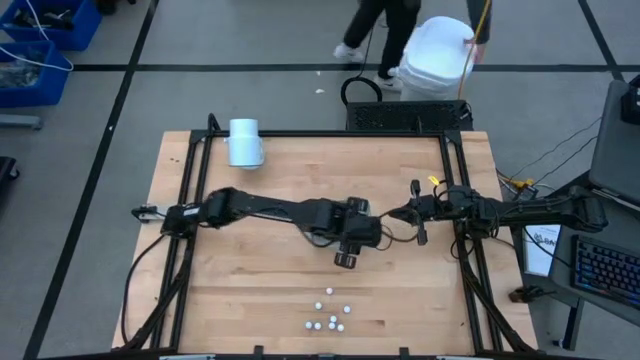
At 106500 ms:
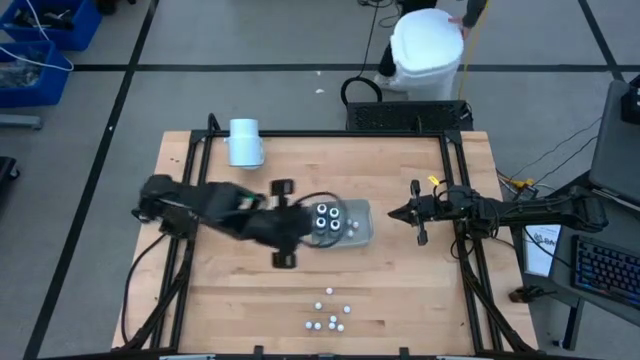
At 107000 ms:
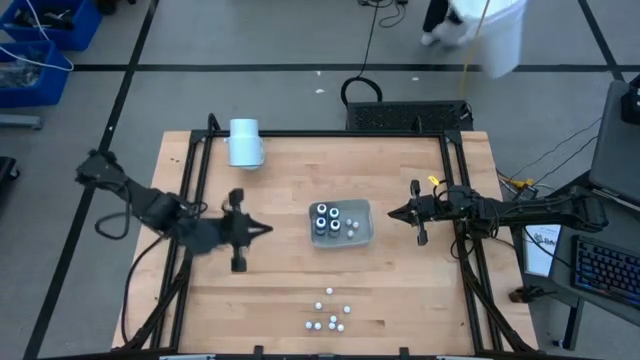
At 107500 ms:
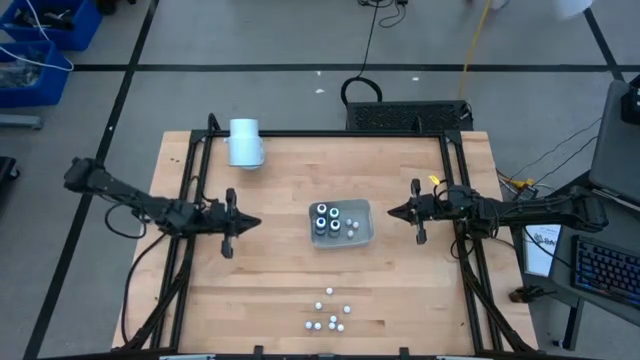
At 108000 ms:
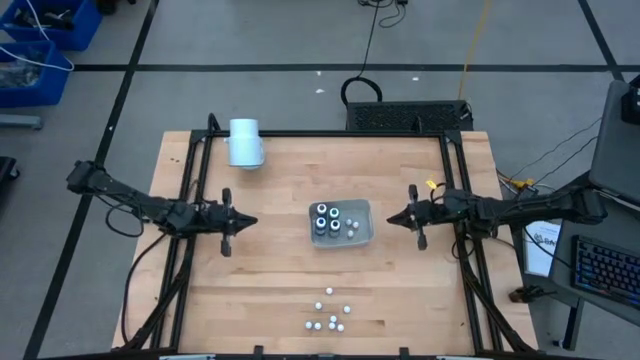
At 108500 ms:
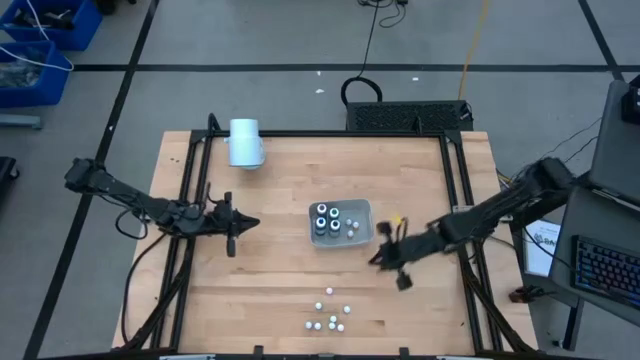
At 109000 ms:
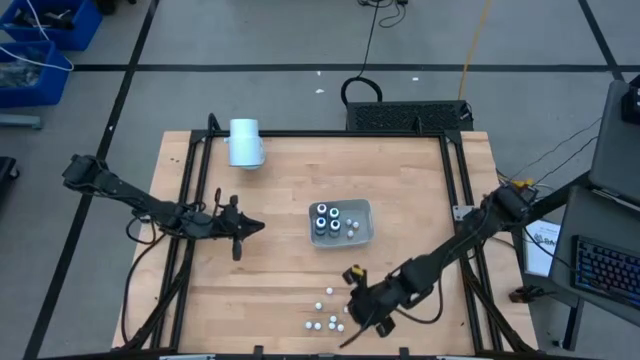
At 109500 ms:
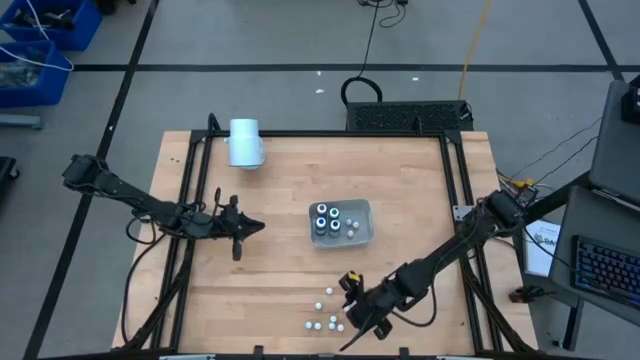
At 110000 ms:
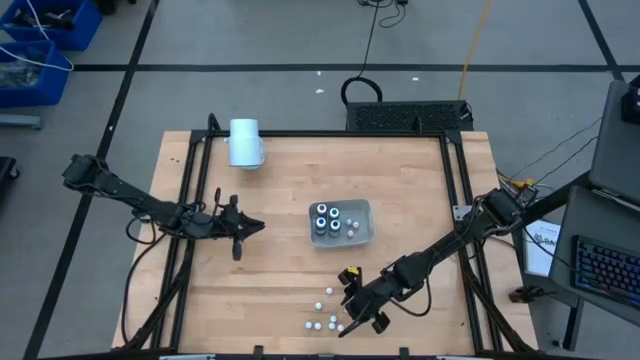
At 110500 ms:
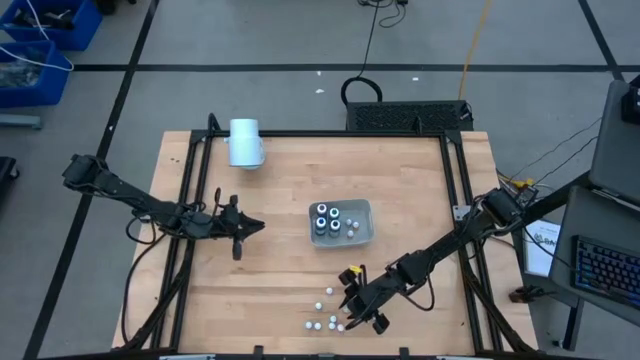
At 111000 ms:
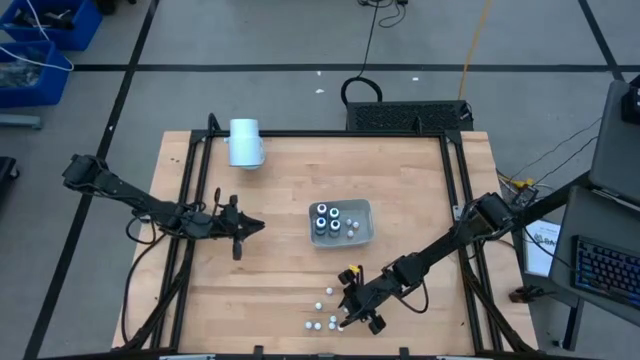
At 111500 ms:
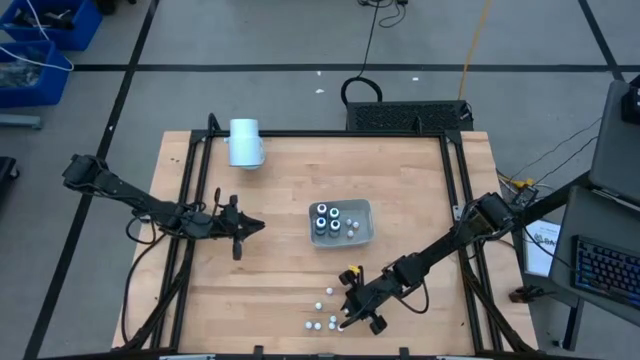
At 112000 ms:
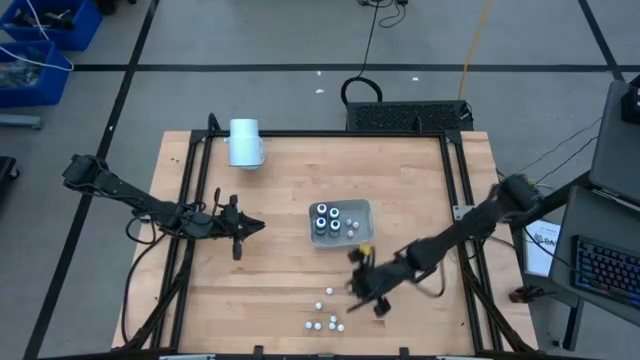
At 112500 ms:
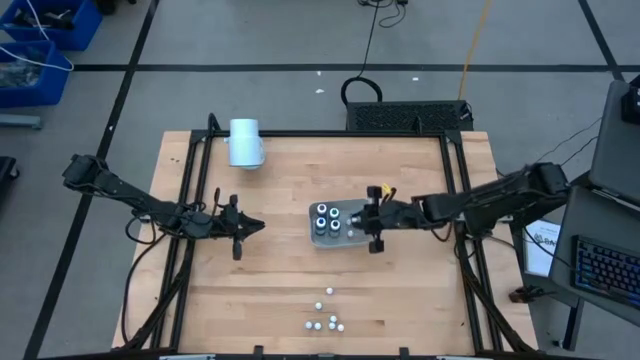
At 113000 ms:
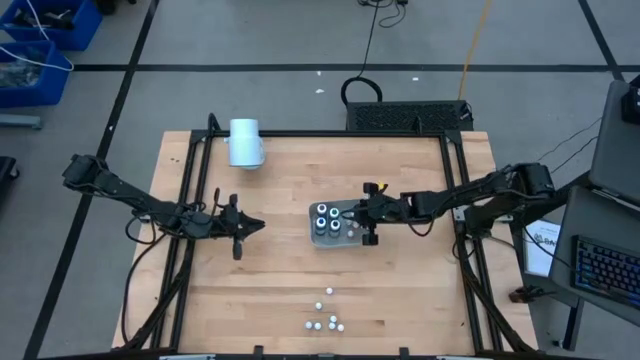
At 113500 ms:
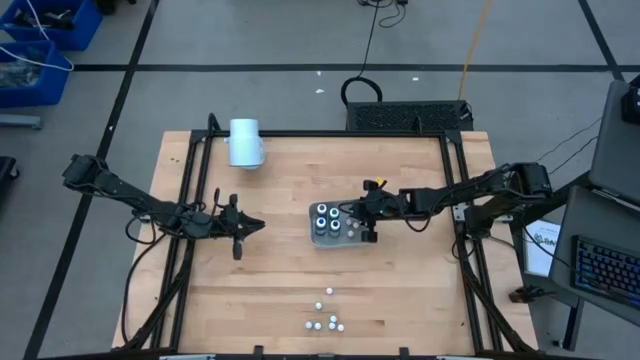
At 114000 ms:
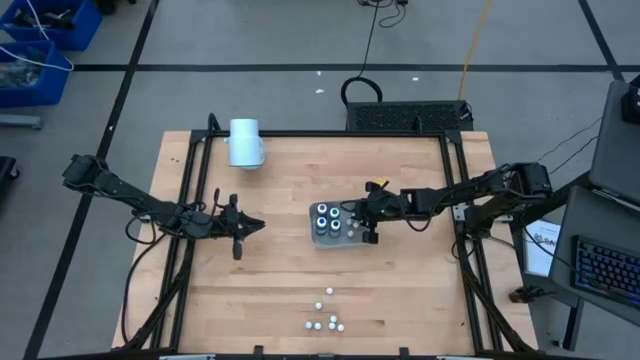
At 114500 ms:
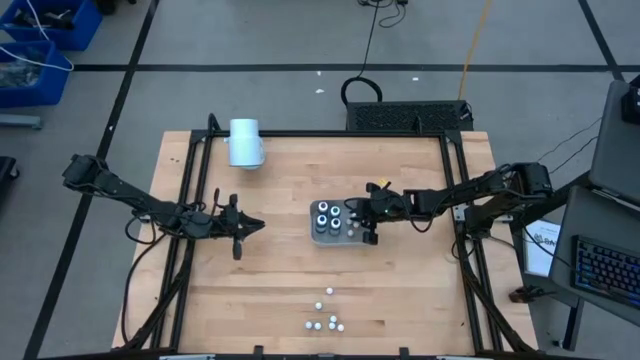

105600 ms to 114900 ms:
Task: Pick & Place food coloring
Put the small purple food coloring bottle into the gray bin

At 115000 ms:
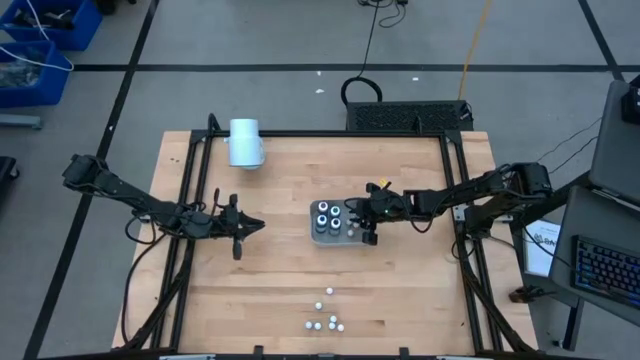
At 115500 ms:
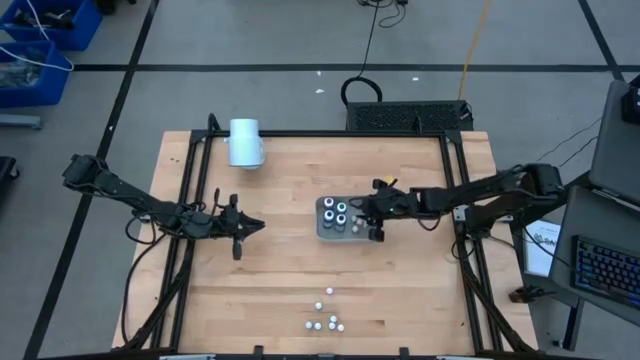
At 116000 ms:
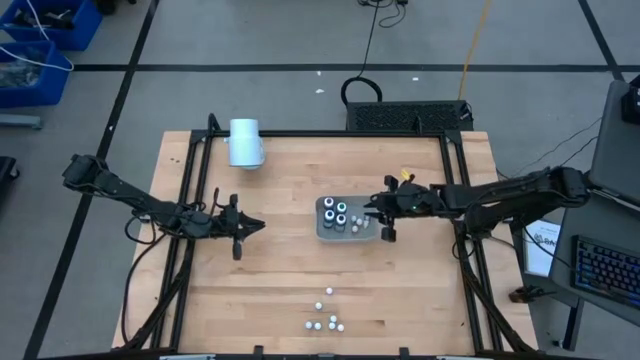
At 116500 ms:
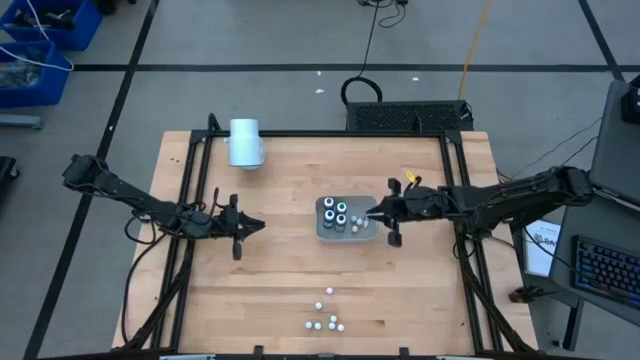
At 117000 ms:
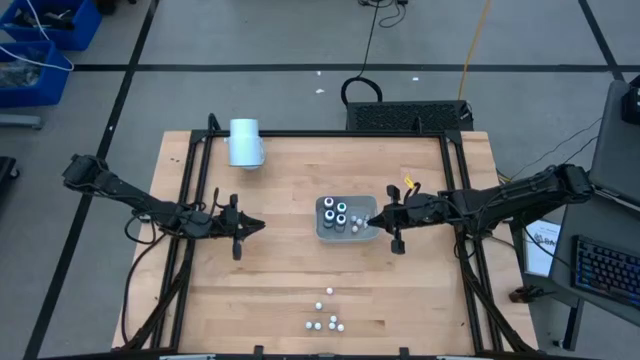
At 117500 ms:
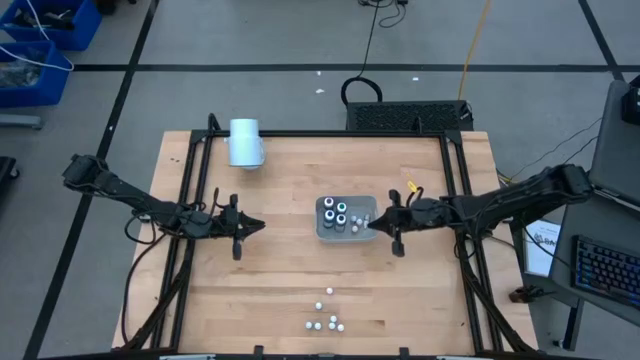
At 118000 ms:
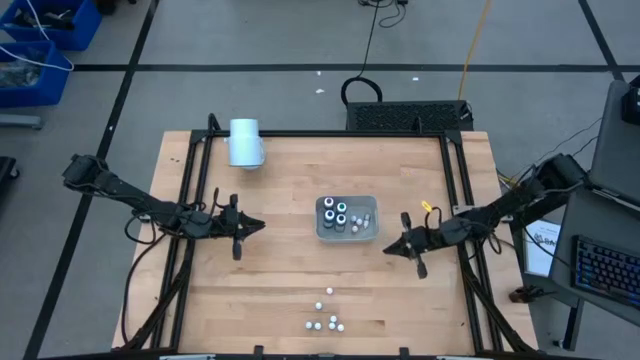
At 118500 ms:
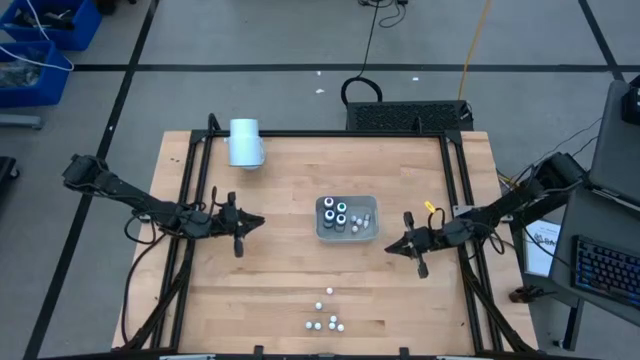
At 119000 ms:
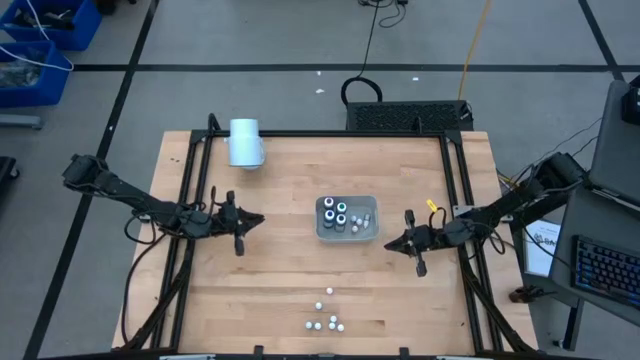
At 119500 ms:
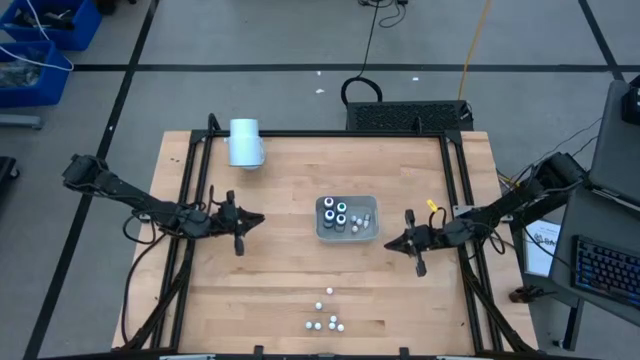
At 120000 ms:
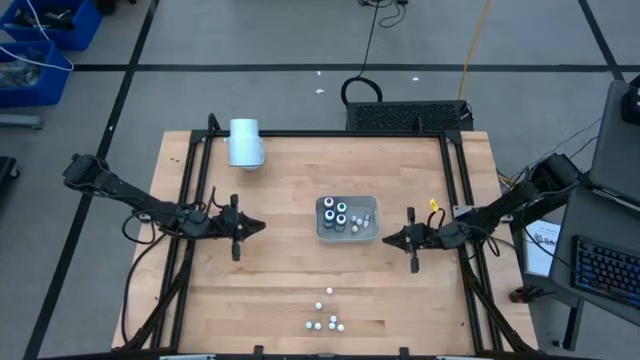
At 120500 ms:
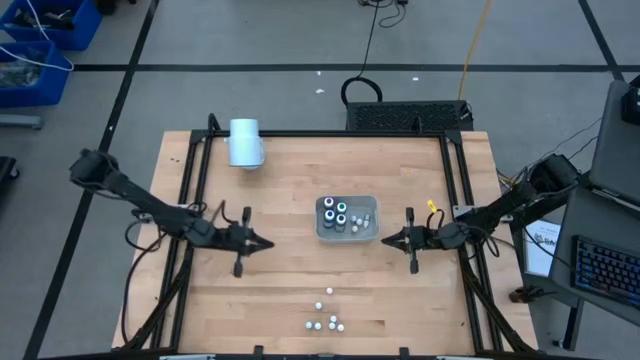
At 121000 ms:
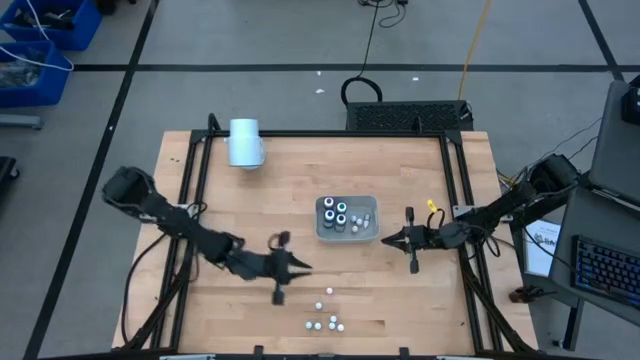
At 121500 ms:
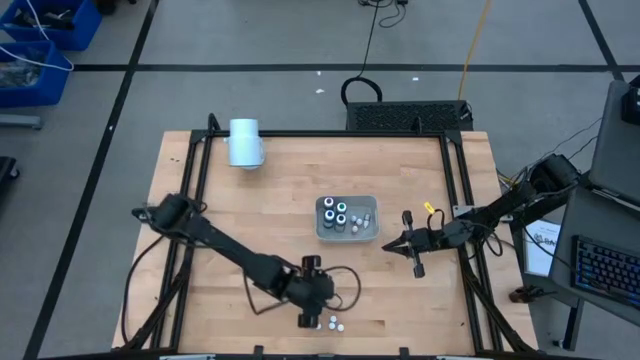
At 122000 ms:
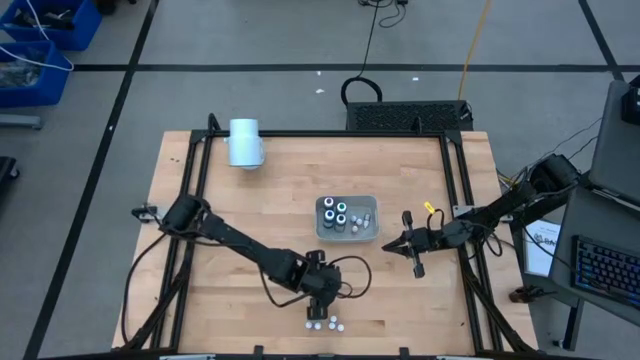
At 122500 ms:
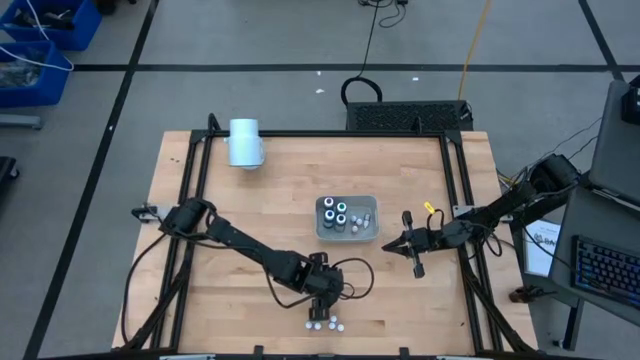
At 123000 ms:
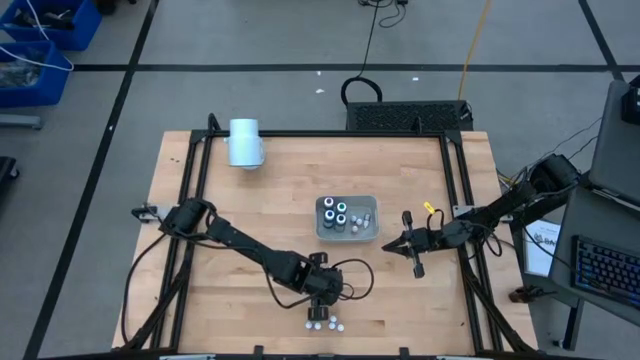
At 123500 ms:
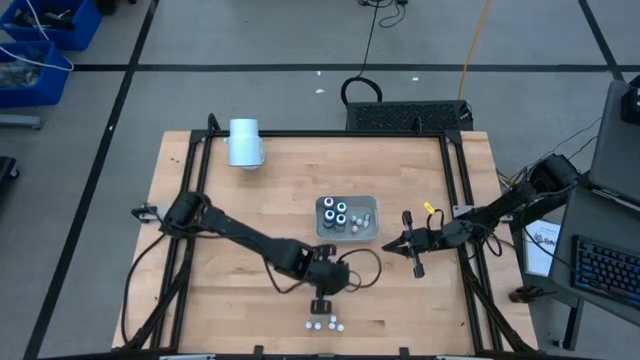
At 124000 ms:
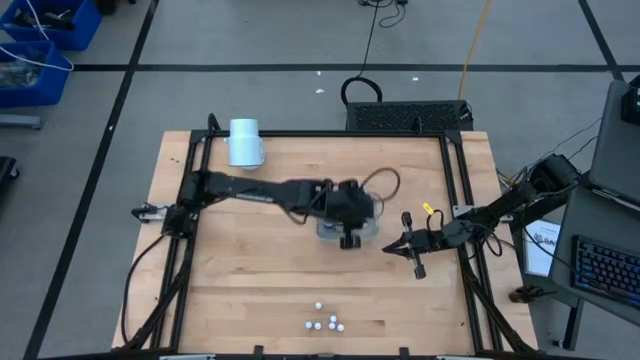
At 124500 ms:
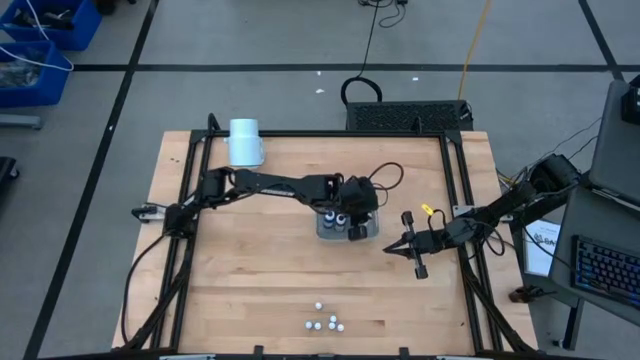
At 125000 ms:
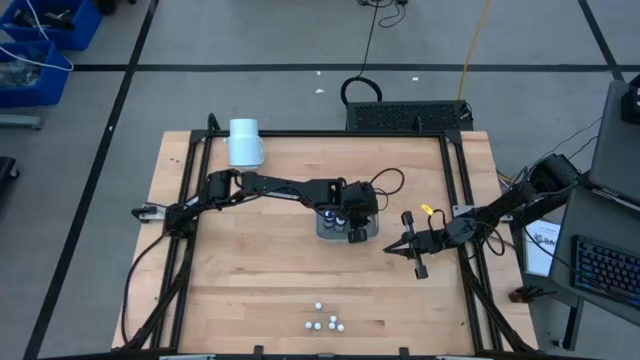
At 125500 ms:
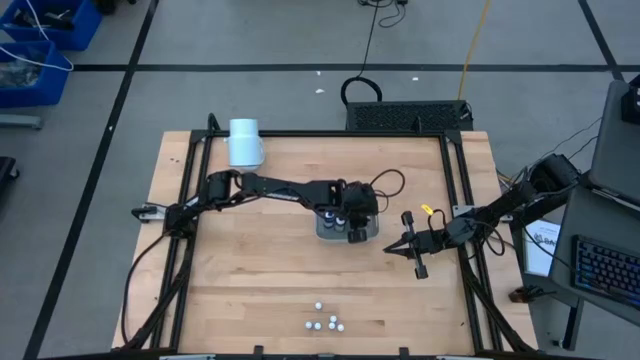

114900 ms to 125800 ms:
Put the small orange food coloring bottle into the gray bin

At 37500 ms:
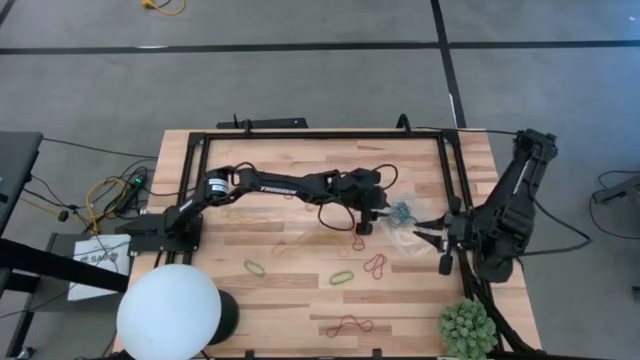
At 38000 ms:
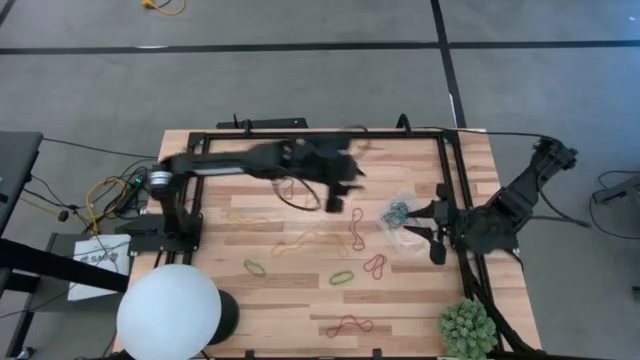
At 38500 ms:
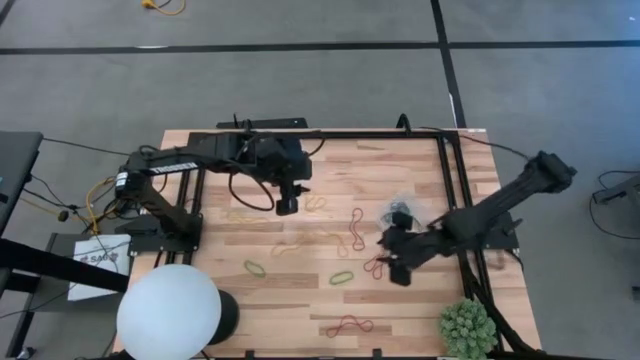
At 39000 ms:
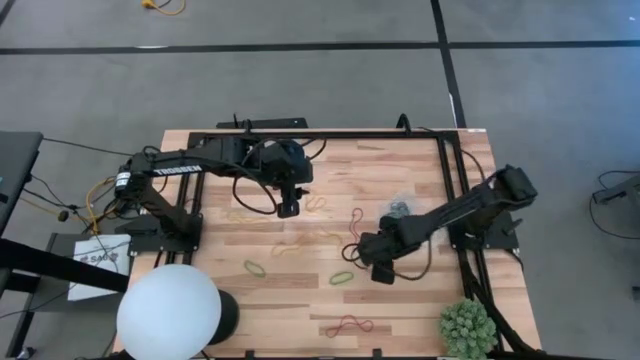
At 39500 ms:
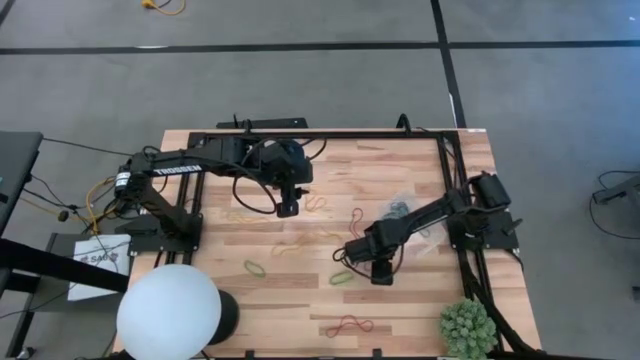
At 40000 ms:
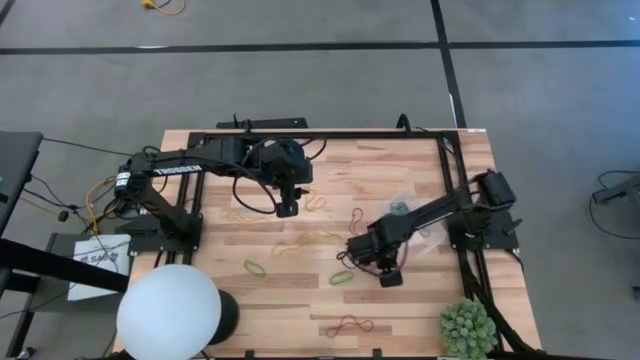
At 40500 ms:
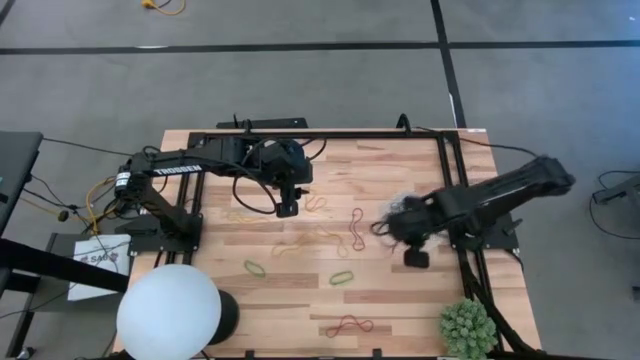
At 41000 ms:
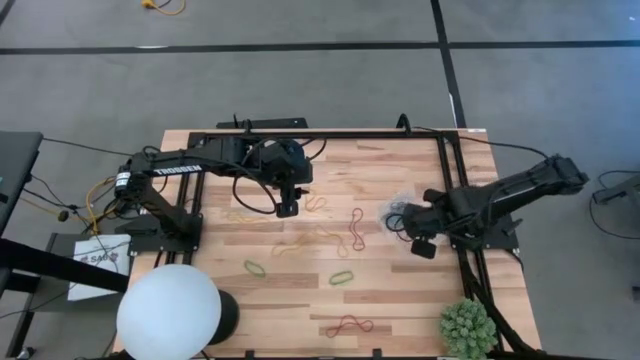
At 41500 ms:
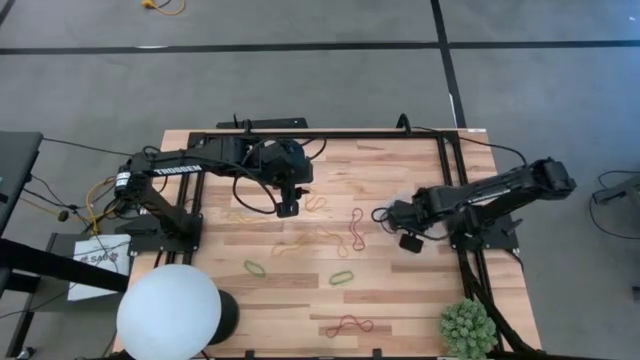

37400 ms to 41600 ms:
Task: Pick and place items into bin
Put the red rubber band into the transparent bin
